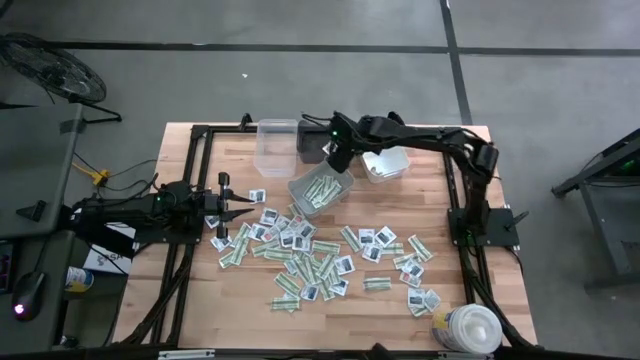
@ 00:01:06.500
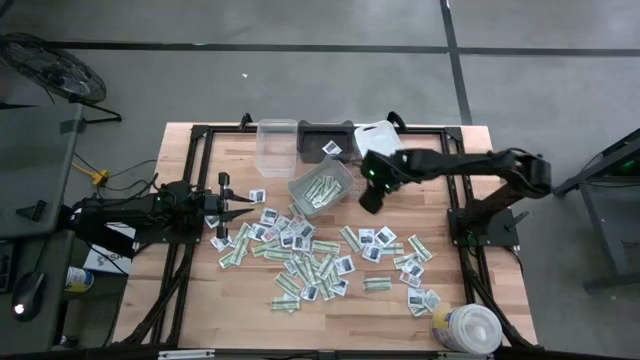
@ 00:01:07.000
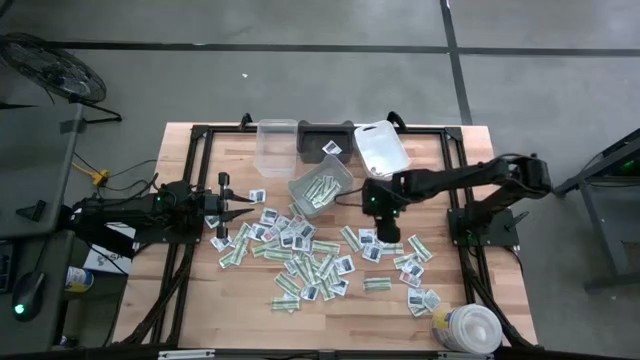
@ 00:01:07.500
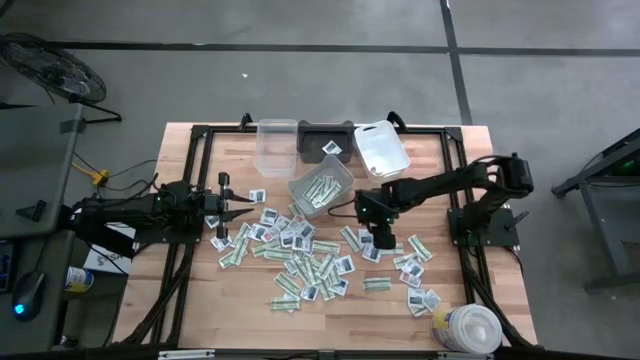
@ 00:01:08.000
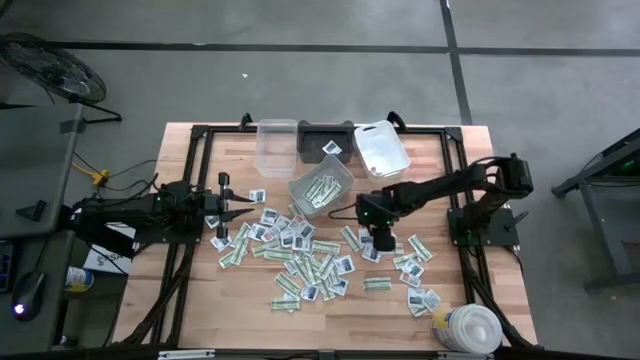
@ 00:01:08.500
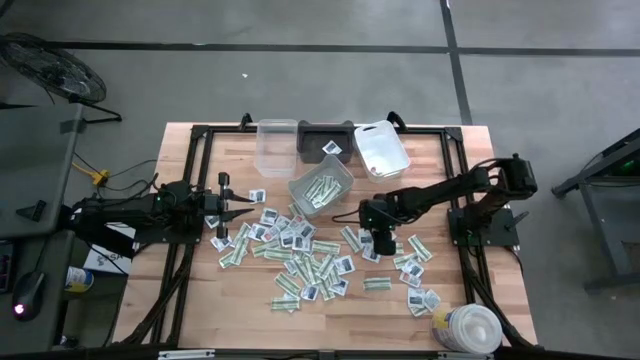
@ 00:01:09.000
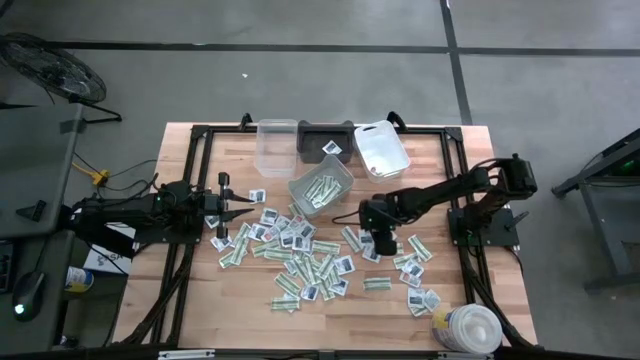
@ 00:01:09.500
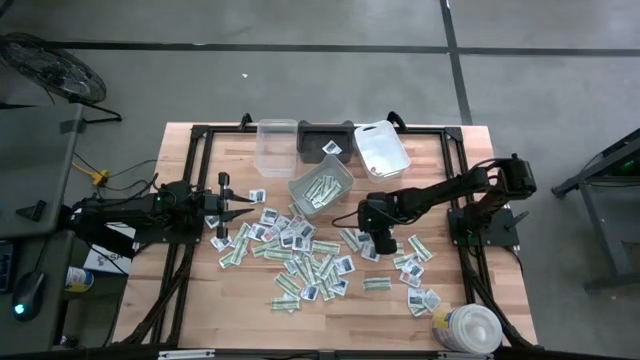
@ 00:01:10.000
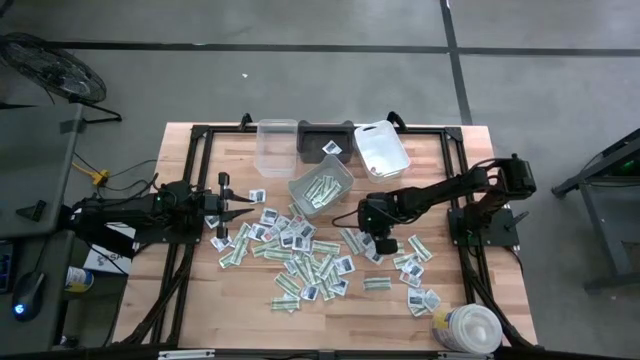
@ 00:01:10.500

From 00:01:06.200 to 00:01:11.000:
Task: Pick & Place First Aid Supplies
Put the towelette pack into the black bin

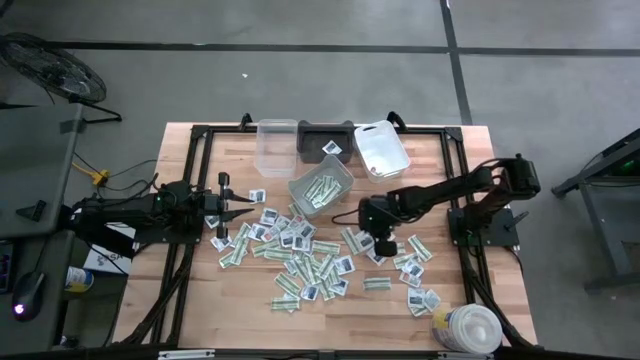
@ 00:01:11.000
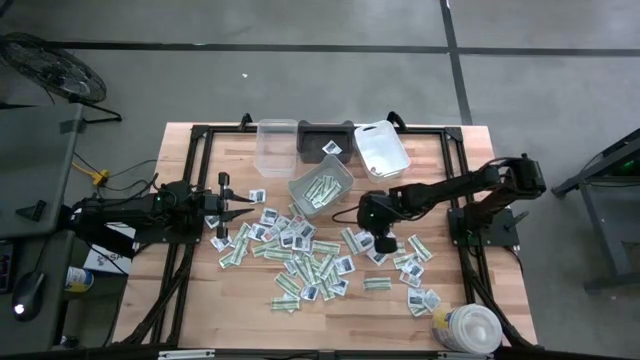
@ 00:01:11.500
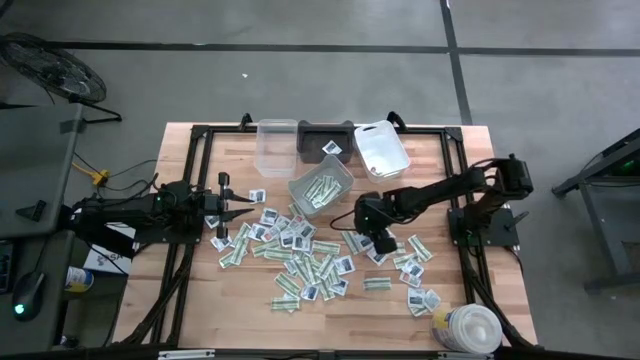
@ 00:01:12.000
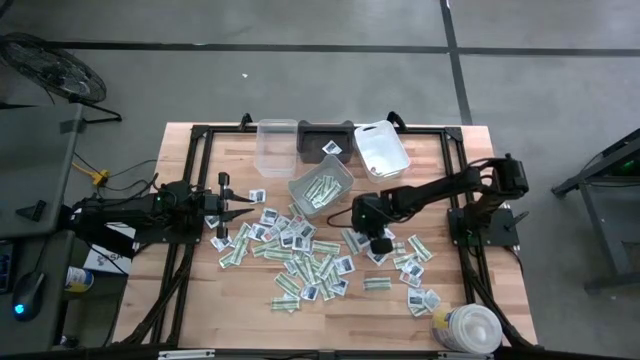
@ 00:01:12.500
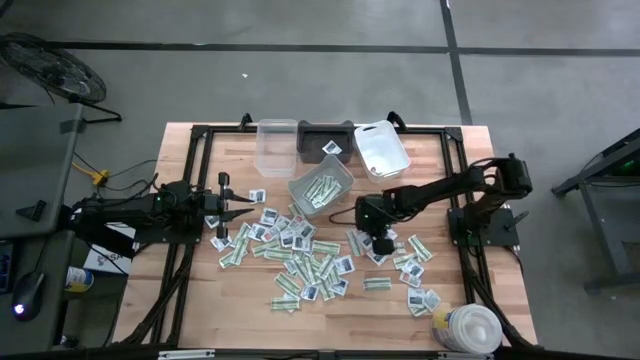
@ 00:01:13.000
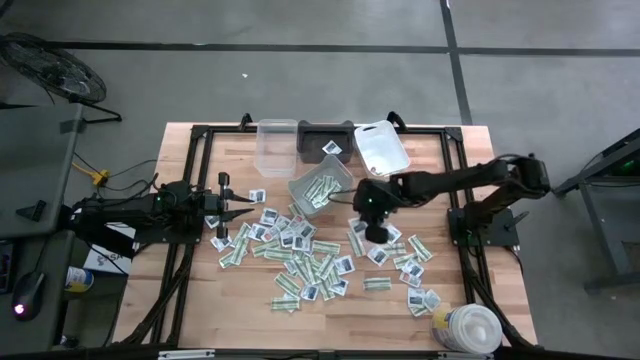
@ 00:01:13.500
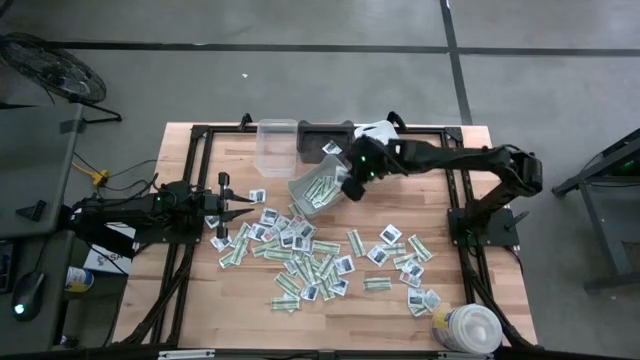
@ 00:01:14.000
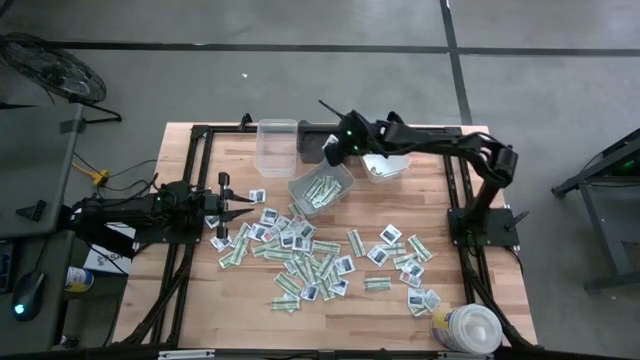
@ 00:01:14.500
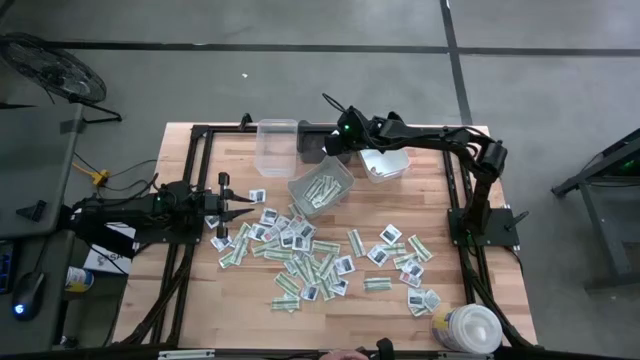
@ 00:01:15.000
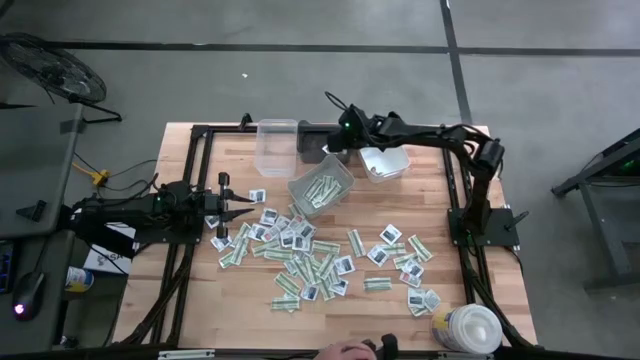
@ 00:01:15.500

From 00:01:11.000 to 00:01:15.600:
Put the towelette pack into the black bin

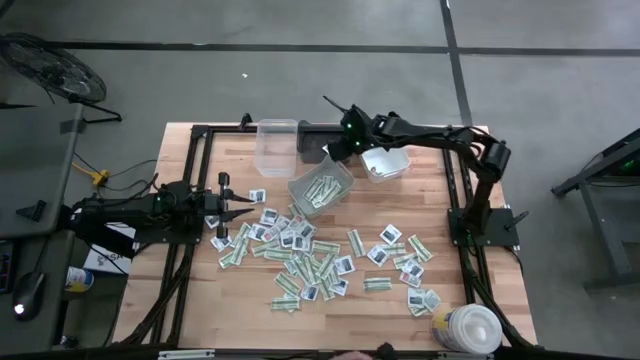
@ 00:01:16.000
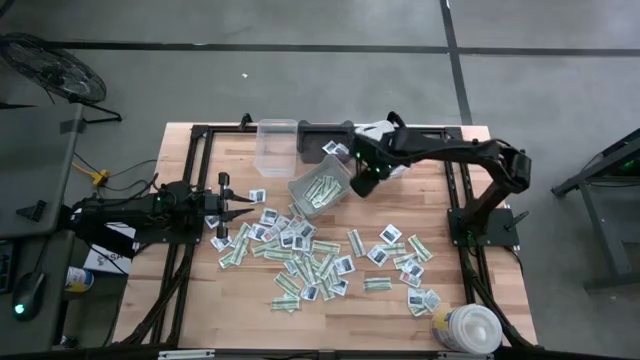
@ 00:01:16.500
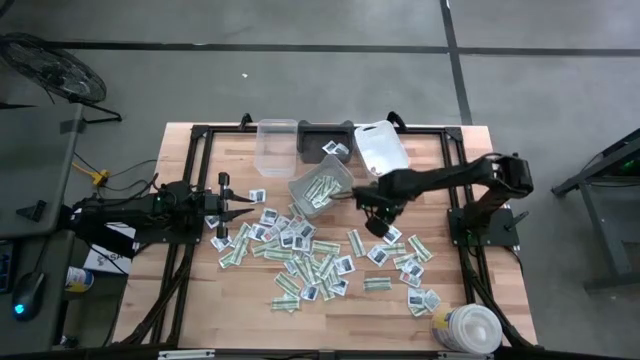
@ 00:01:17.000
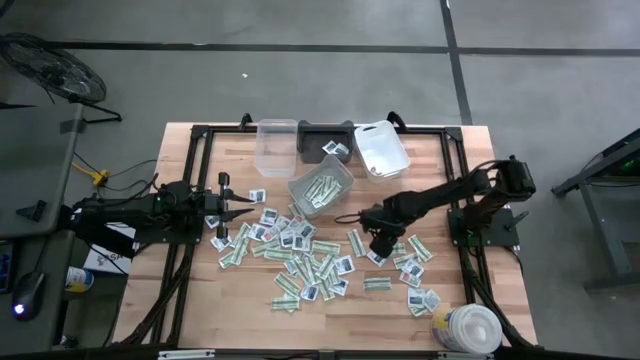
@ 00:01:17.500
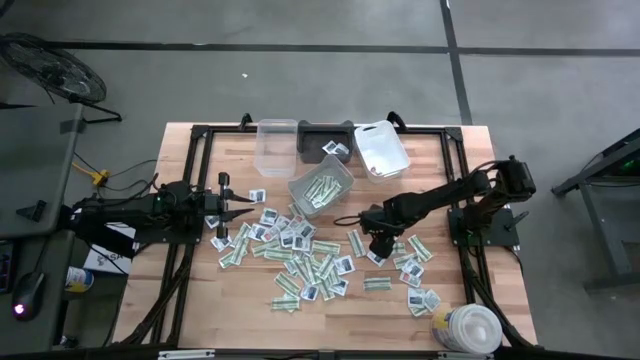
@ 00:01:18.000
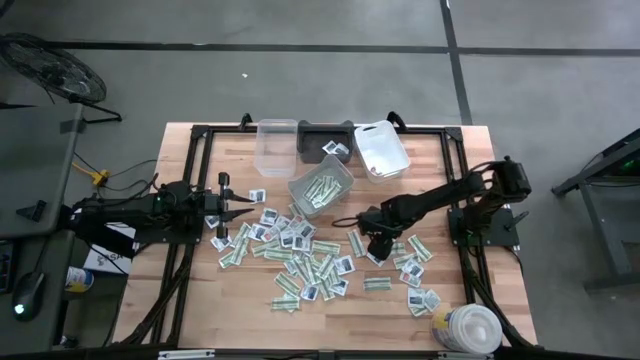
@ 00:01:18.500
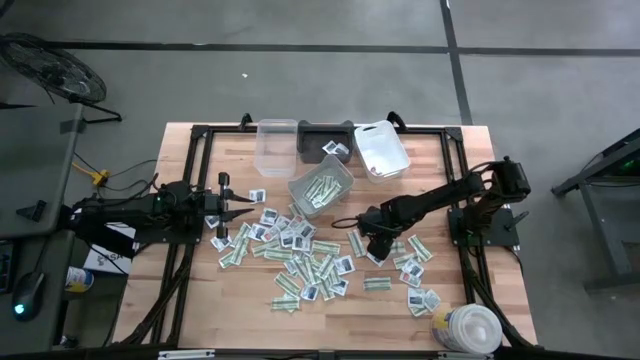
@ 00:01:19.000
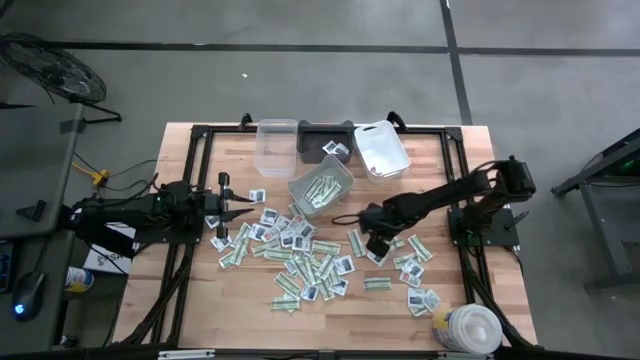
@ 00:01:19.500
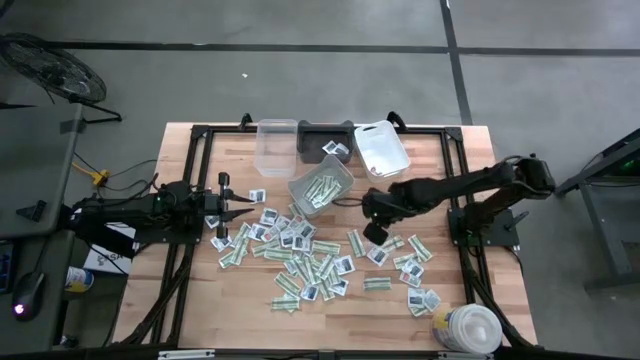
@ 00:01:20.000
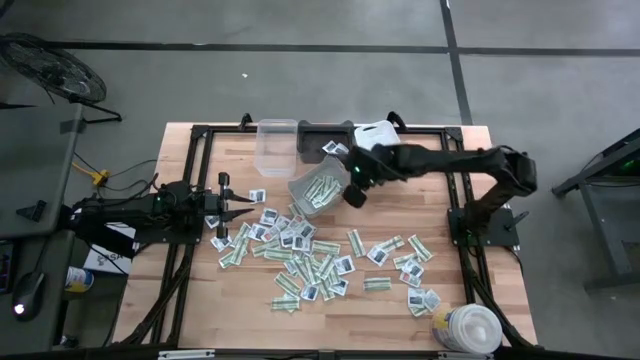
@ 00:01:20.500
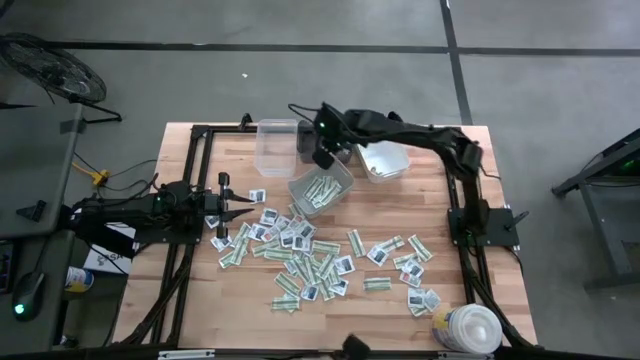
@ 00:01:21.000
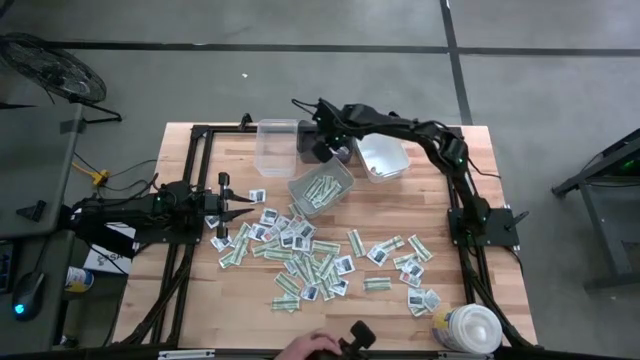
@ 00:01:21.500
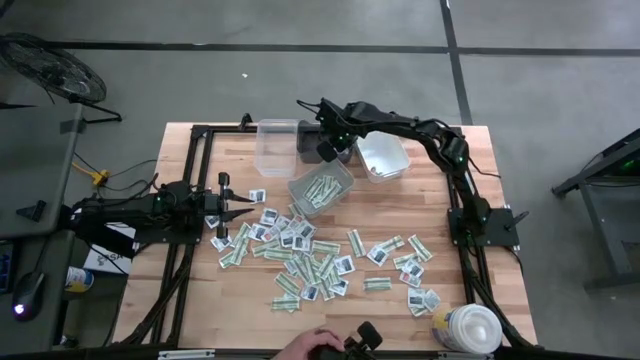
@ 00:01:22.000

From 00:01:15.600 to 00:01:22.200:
Put the towelette pack into the black bin

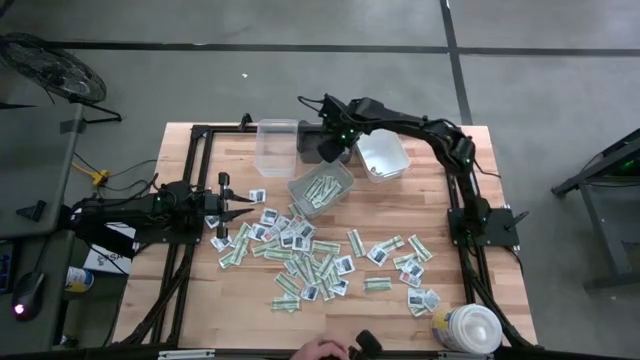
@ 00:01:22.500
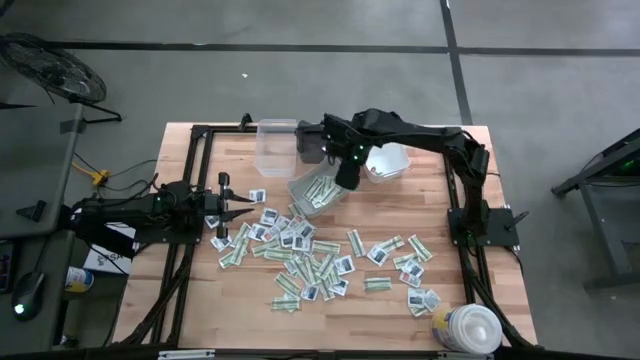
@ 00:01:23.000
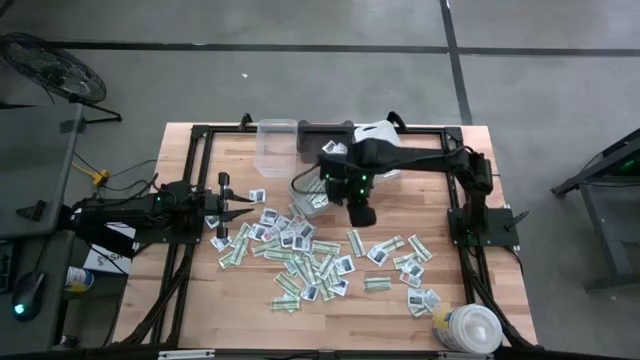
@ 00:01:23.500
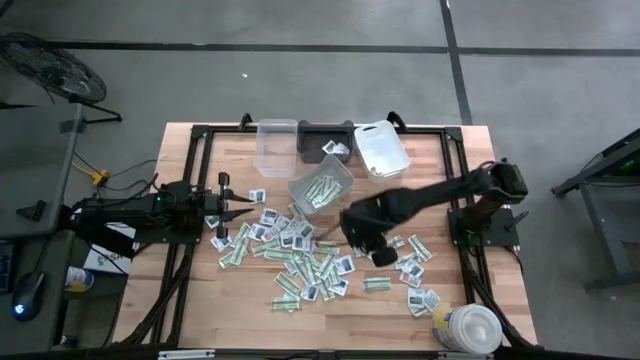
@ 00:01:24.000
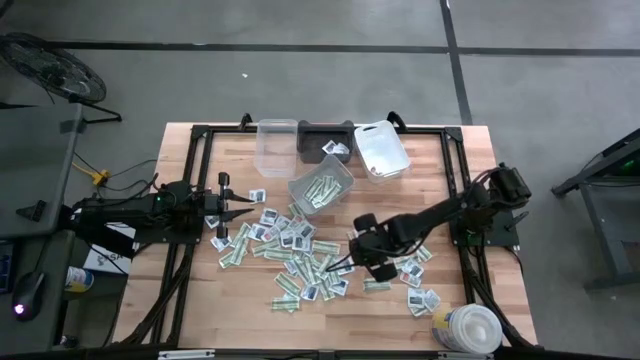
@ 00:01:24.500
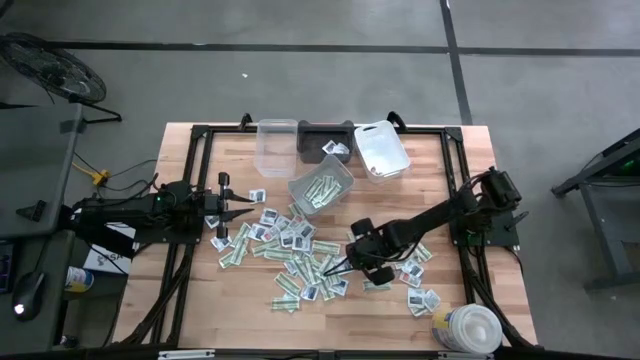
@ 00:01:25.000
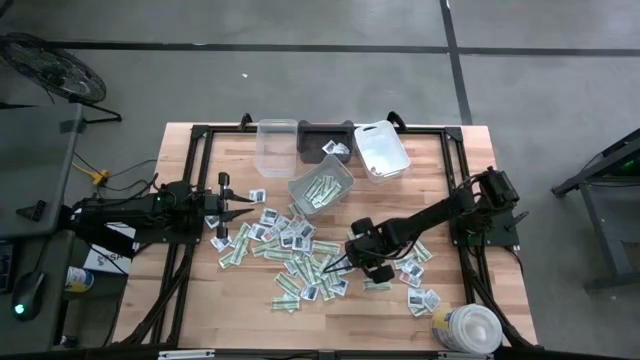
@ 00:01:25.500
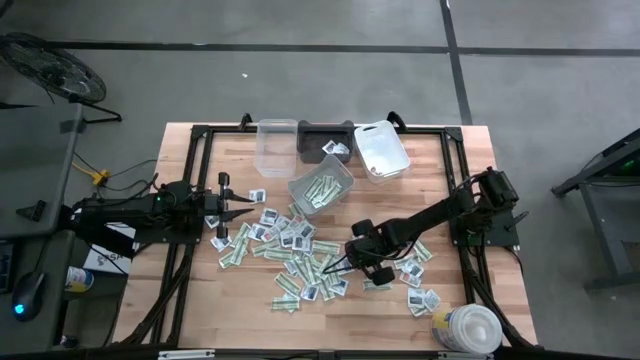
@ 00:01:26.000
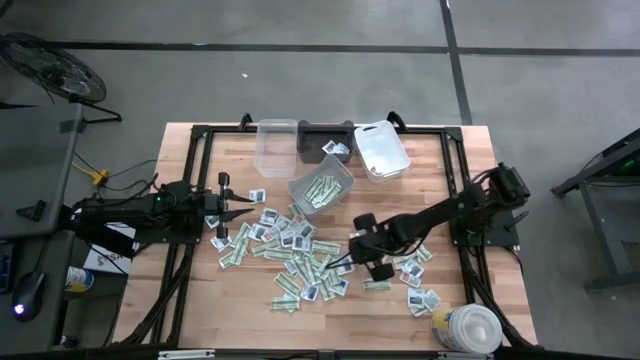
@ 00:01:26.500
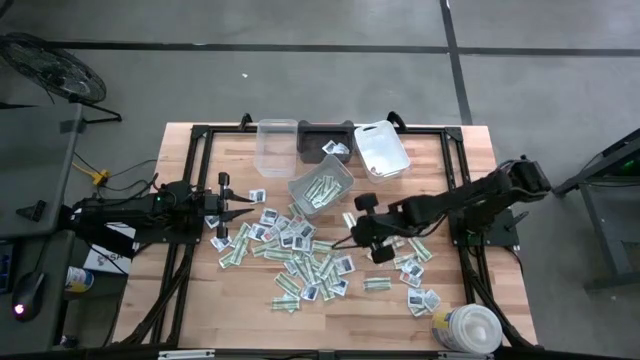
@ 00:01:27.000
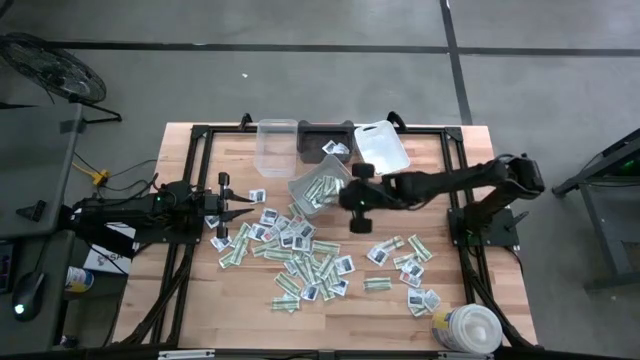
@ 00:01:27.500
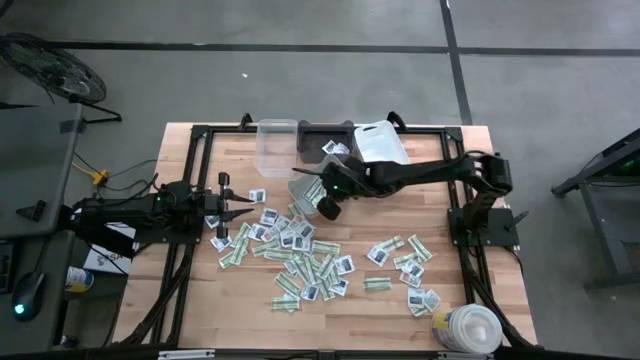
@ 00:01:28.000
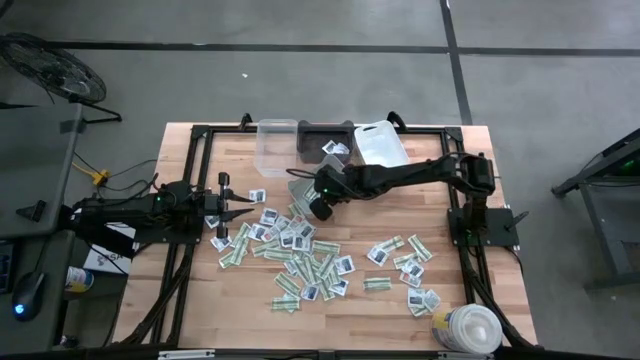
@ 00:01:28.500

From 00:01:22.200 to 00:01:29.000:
Put the bandage pack into the gray bin
